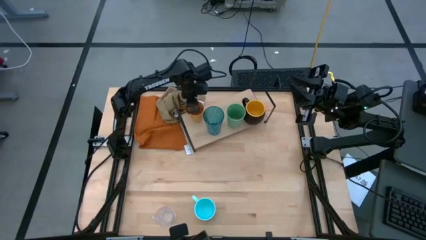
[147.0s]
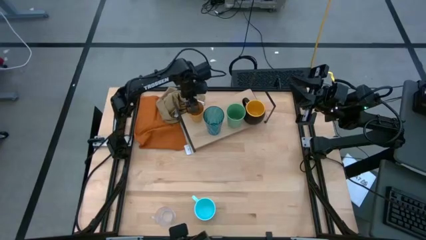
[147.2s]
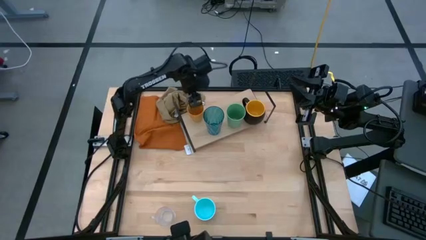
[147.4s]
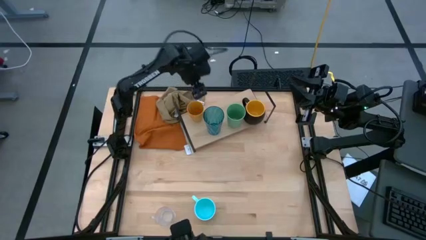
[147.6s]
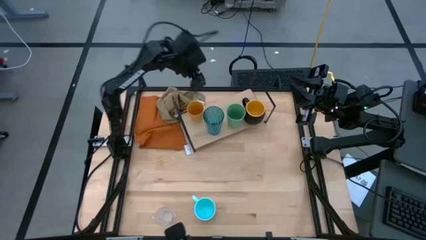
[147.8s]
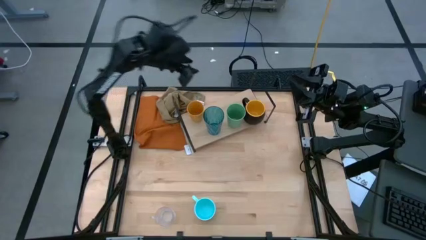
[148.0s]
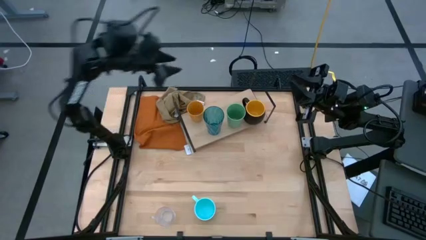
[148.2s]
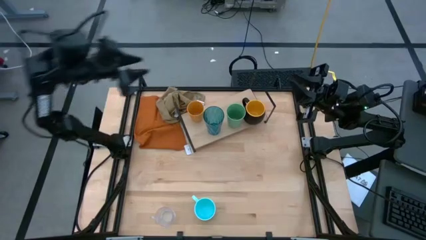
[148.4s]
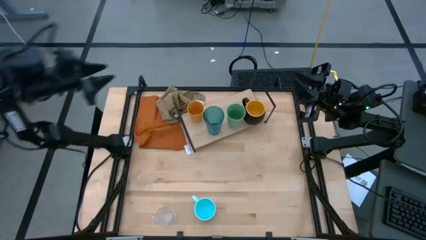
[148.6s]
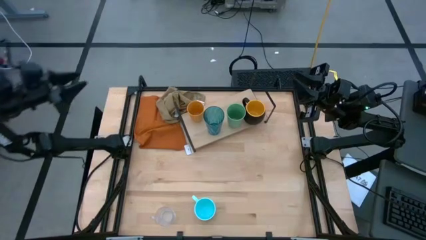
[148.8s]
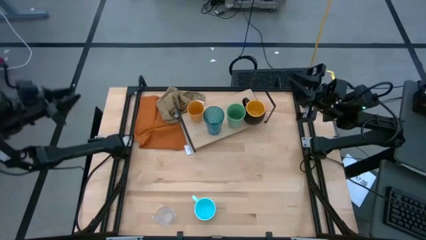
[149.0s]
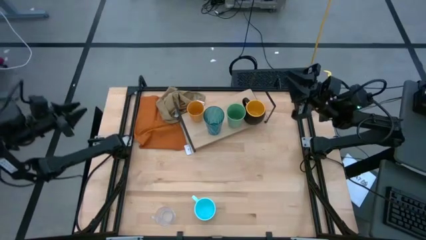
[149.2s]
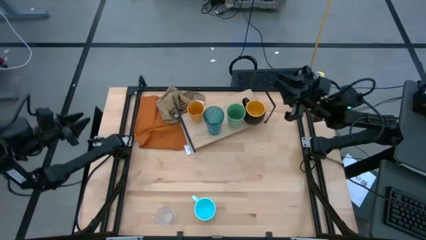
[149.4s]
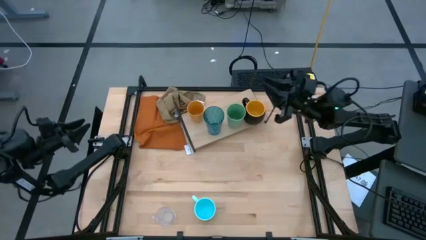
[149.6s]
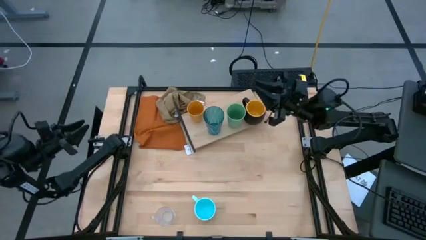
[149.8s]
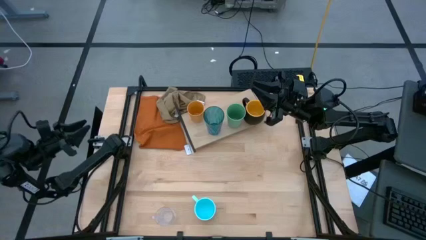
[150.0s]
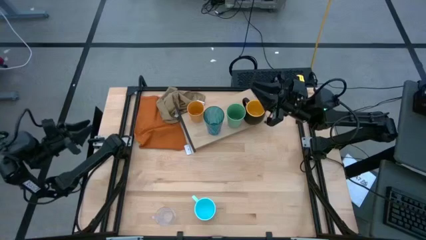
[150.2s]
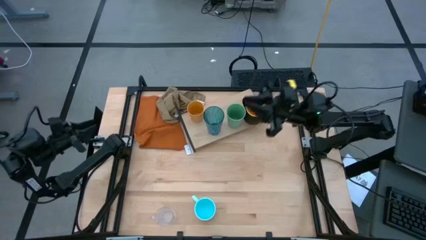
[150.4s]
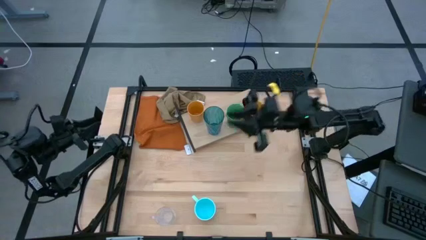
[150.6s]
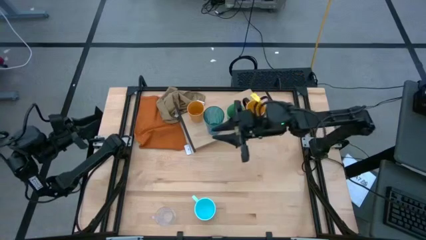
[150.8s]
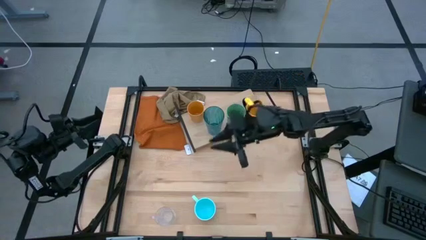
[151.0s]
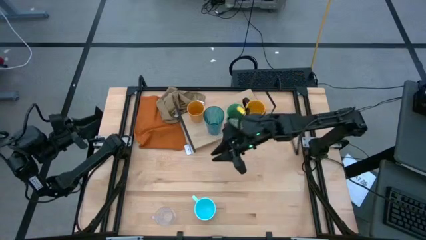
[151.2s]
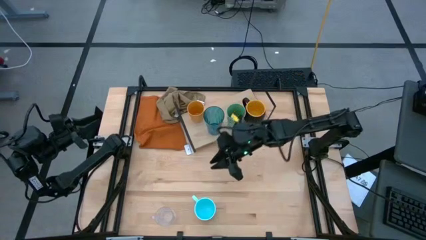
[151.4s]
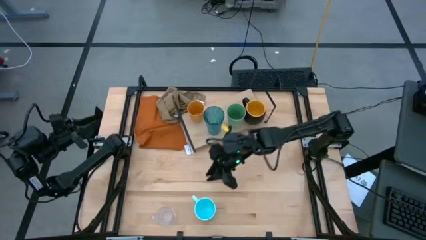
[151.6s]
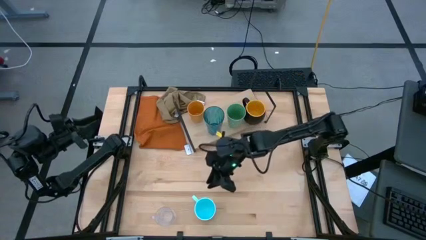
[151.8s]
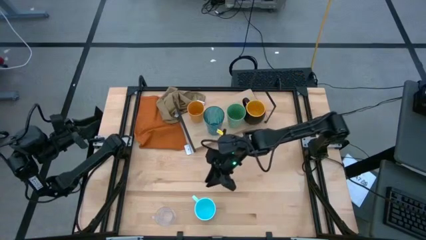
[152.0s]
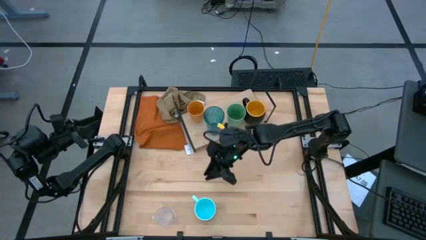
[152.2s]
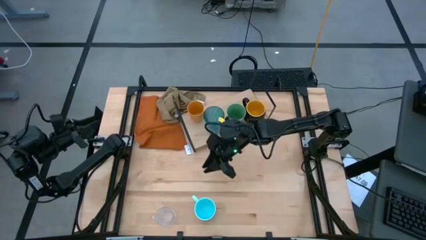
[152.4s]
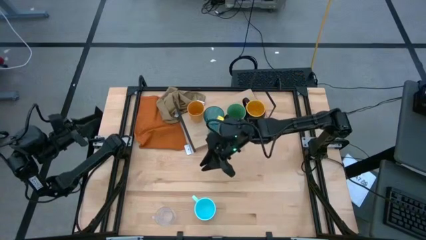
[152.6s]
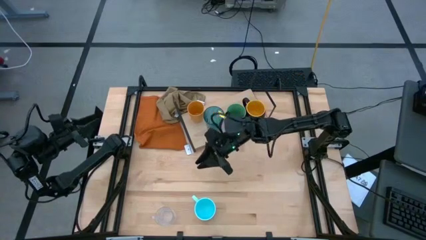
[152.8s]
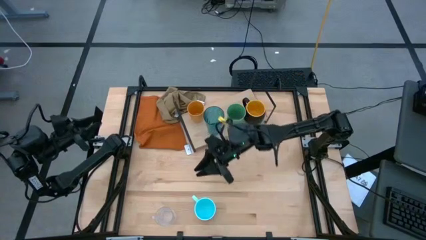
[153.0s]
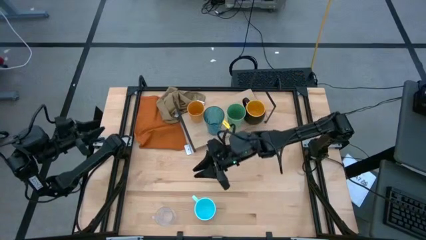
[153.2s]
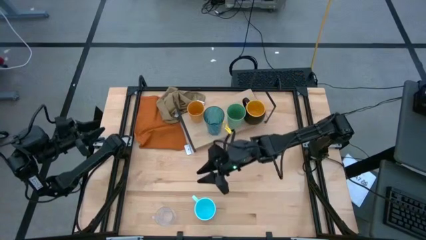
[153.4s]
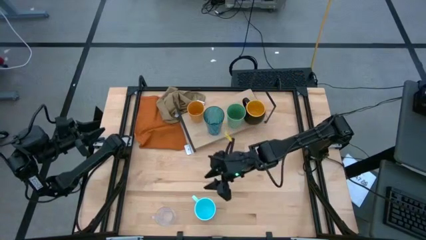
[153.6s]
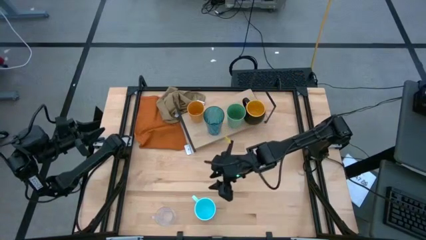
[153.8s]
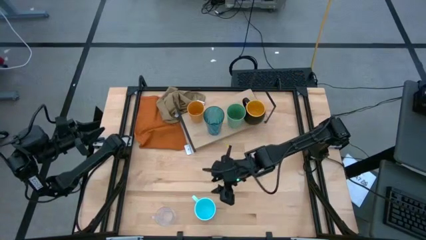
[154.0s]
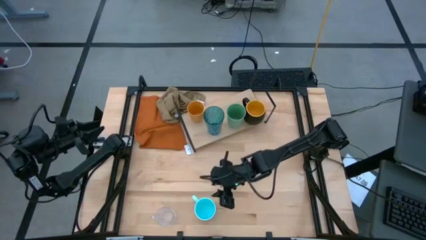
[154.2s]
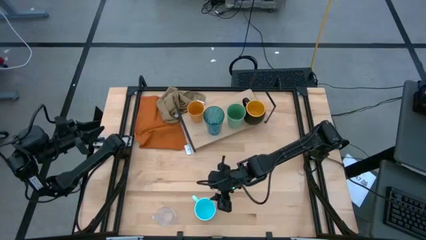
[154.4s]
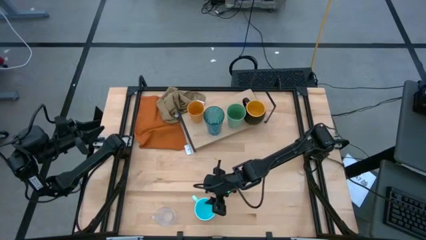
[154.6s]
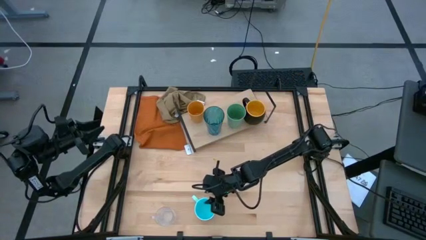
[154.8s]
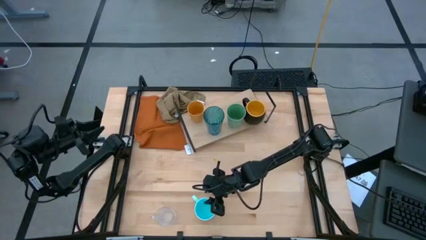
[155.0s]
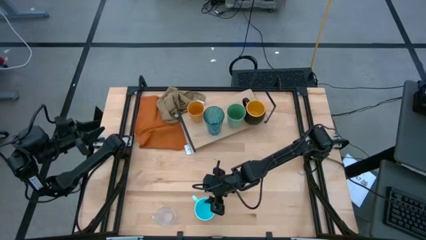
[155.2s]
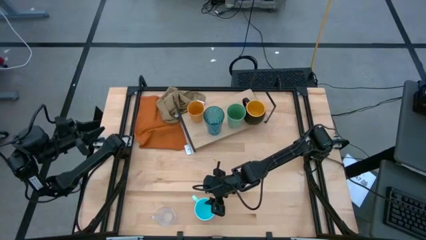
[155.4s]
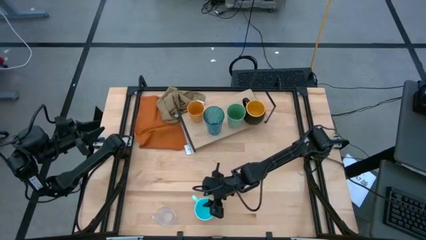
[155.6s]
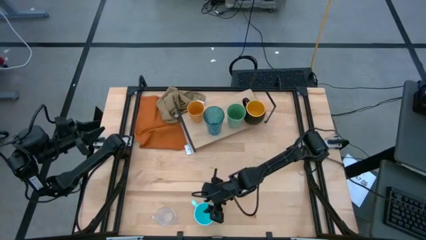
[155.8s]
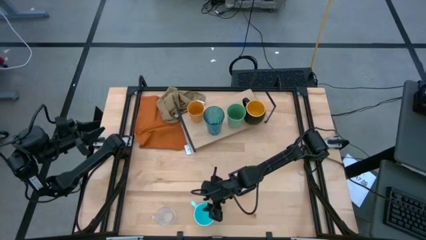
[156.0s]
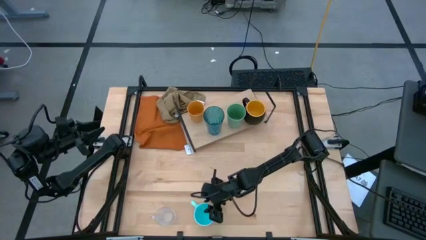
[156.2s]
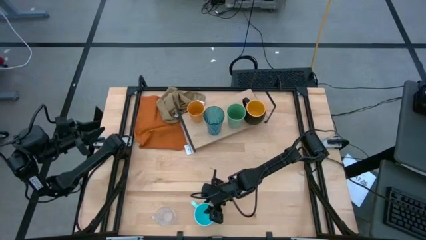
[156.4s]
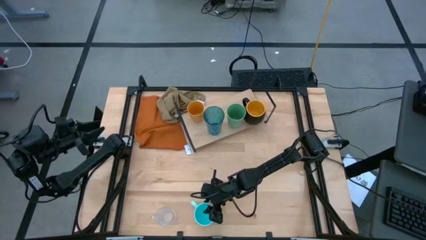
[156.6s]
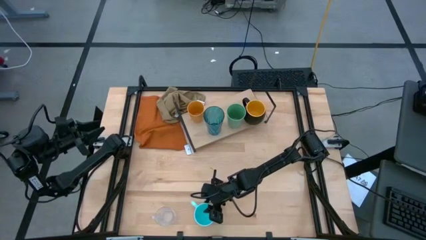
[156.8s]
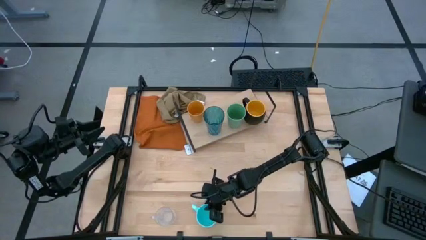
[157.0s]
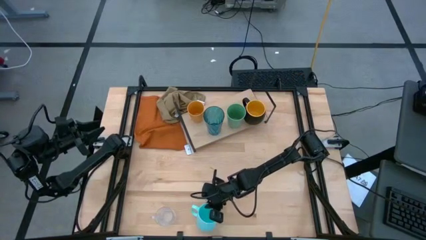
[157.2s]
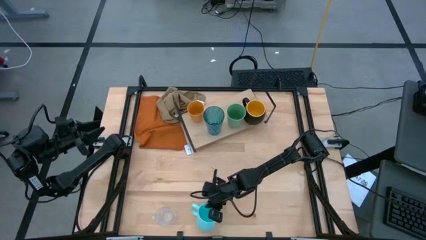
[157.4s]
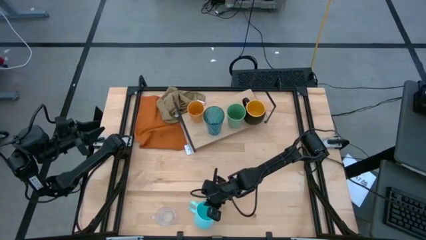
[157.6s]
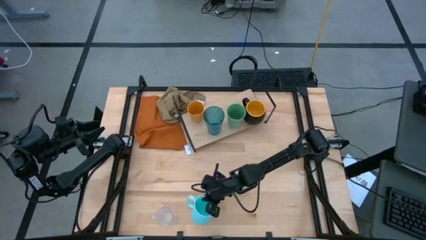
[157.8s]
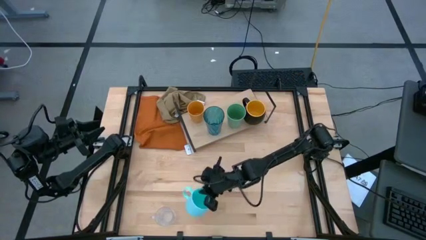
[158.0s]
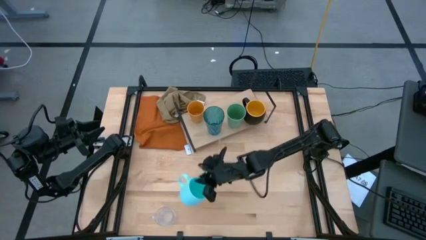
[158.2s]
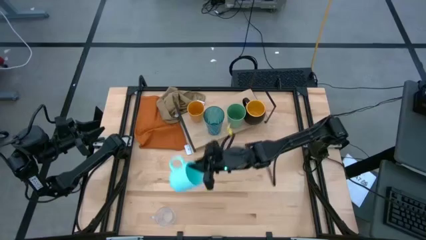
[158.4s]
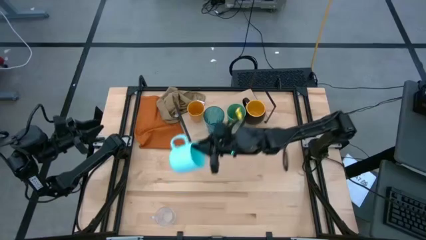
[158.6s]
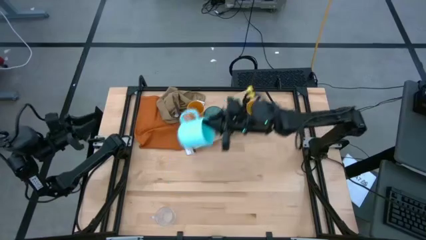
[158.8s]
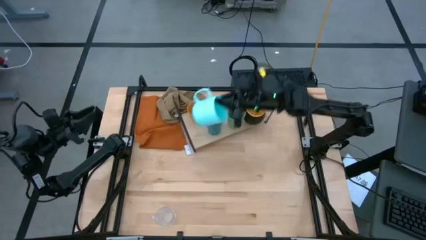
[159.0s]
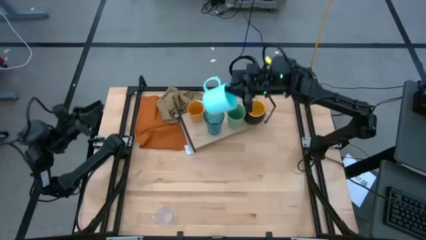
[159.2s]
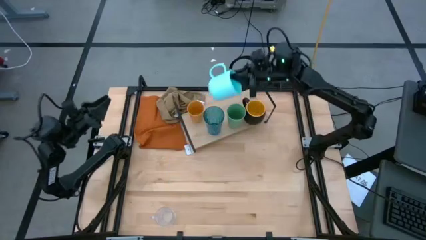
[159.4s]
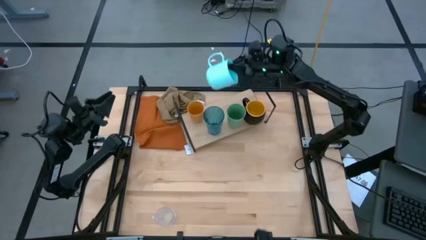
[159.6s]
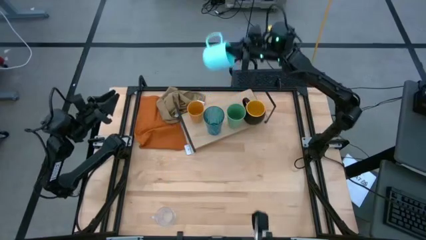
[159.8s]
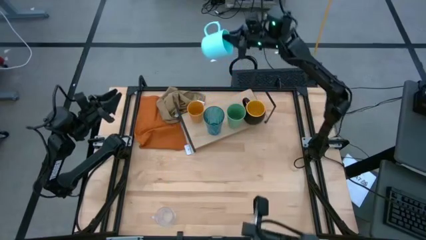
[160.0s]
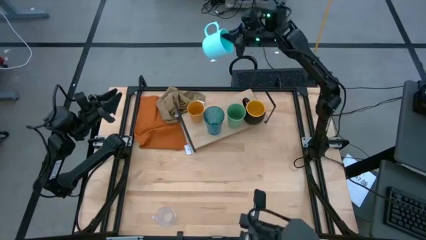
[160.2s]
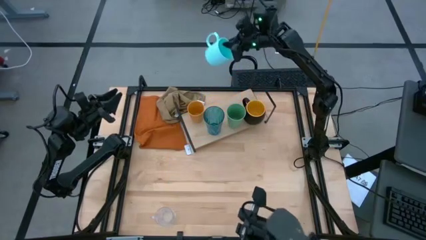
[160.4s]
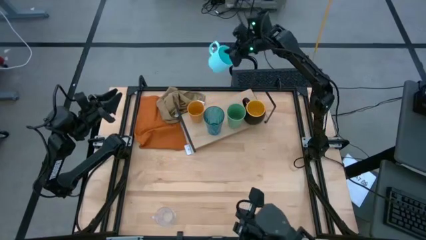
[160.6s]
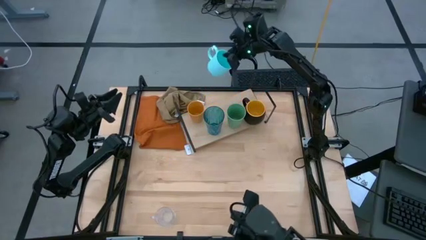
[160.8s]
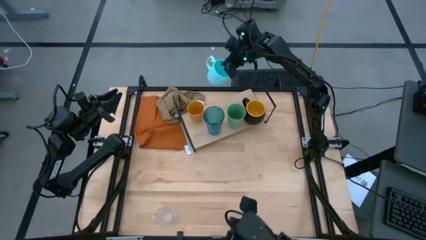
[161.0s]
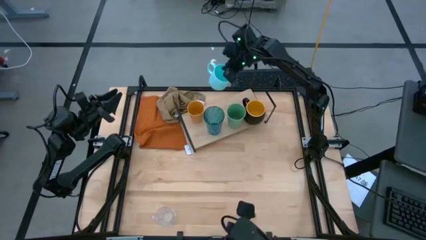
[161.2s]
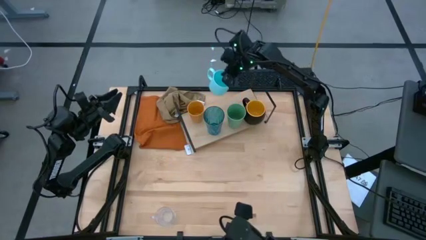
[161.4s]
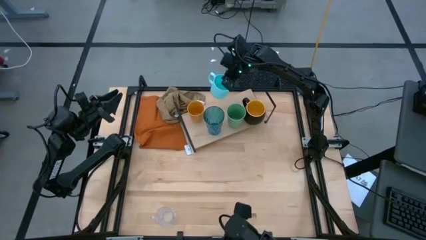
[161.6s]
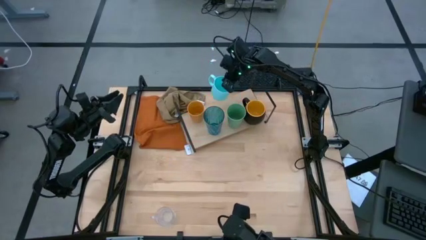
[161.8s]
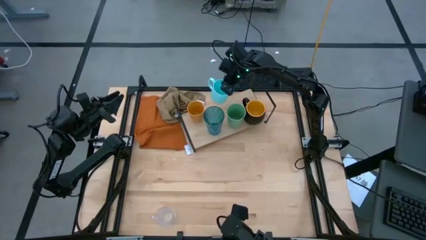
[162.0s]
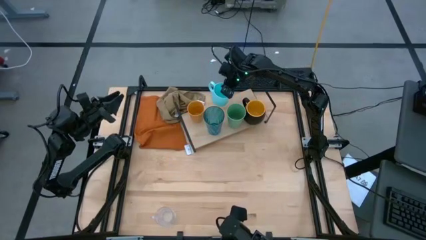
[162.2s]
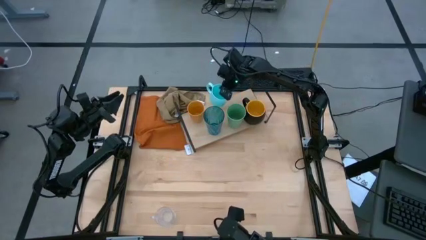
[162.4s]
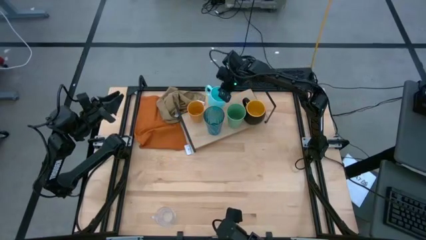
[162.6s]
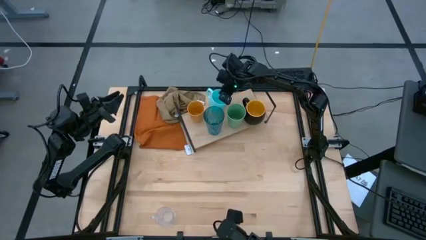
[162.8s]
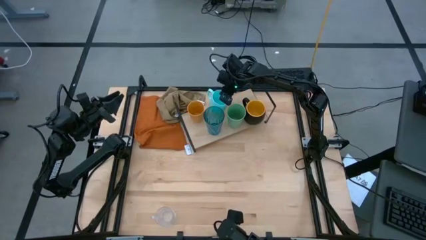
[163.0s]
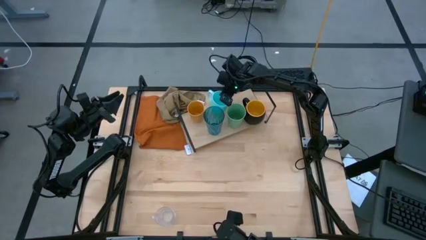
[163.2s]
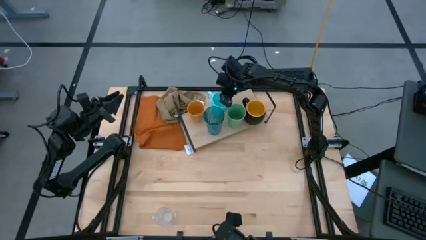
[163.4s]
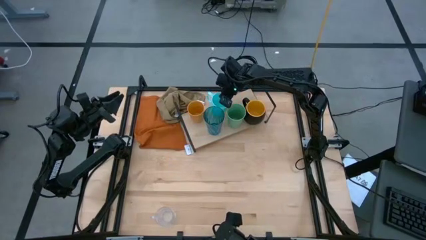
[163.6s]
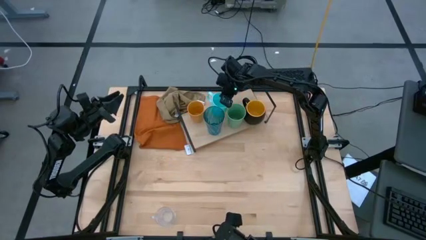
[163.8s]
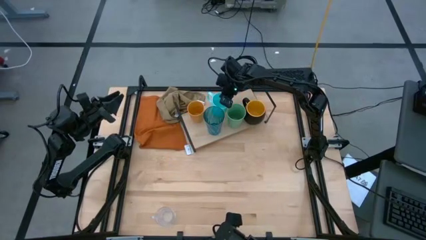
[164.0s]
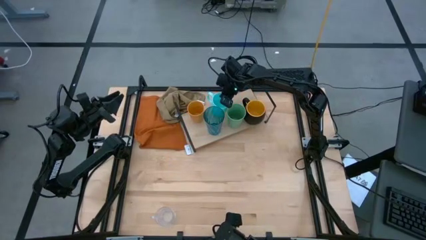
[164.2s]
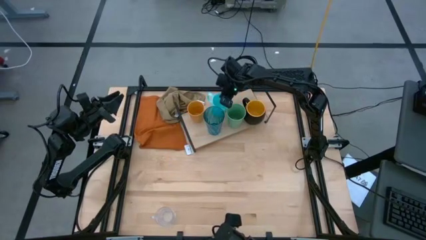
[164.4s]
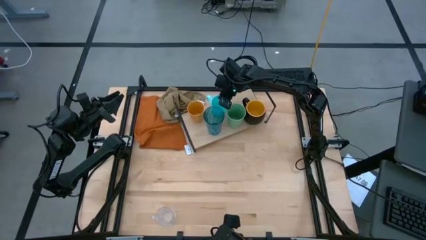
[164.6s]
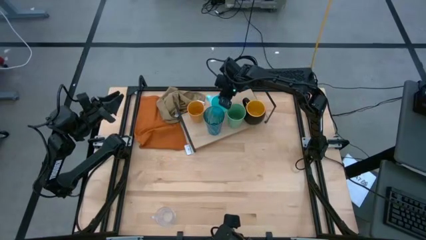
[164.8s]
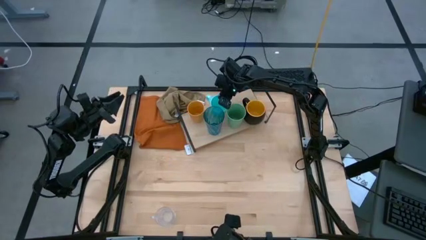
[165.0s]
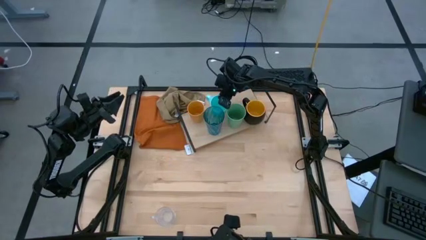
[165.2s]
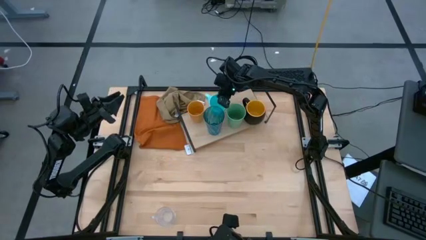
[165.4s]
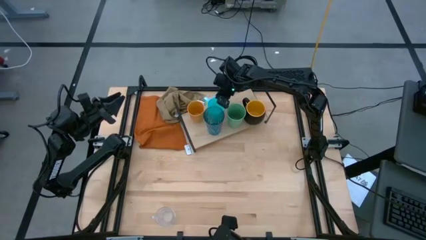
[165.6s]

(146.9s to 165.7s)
Task: Stack small to large cups/mugs on shelf
Put the blue mug on the shelf
